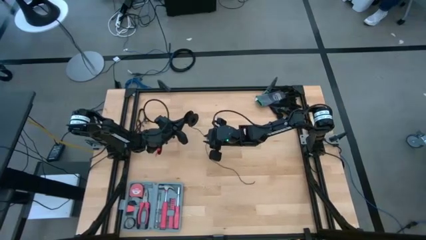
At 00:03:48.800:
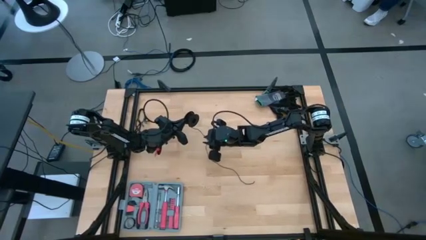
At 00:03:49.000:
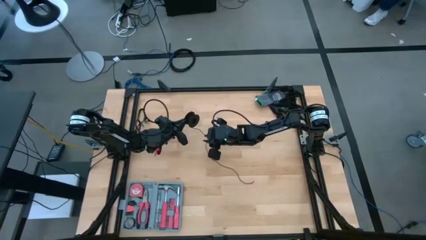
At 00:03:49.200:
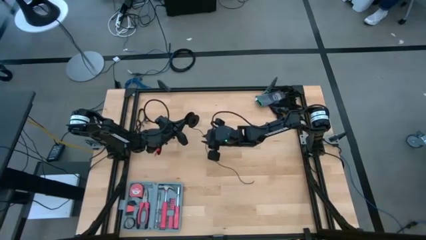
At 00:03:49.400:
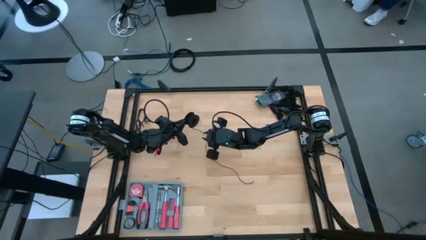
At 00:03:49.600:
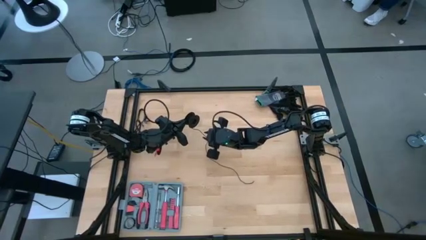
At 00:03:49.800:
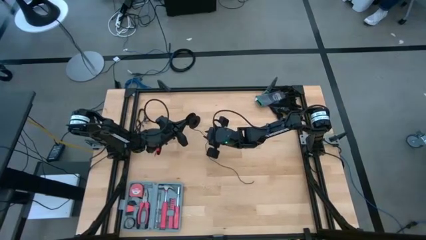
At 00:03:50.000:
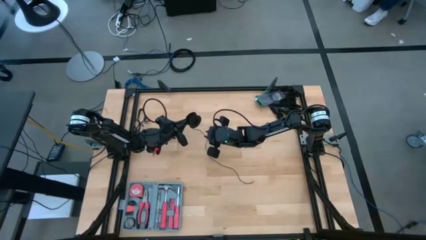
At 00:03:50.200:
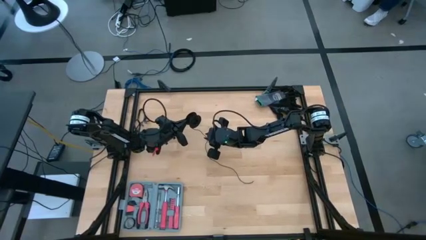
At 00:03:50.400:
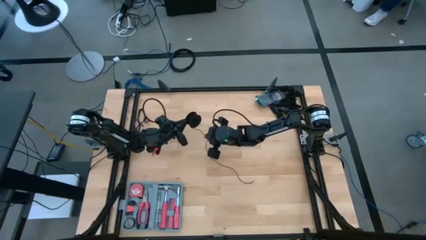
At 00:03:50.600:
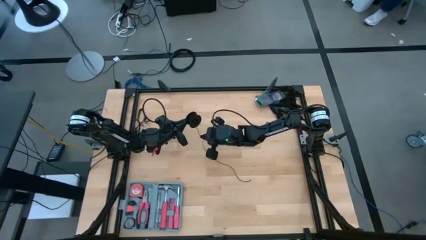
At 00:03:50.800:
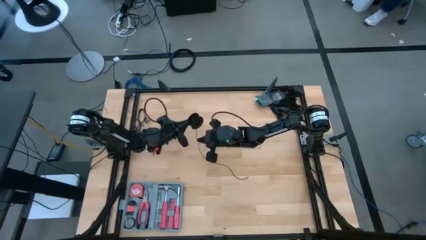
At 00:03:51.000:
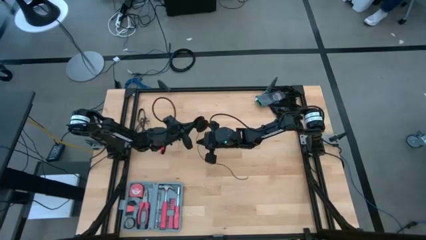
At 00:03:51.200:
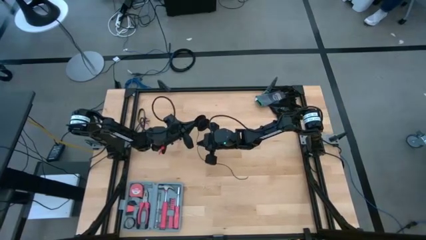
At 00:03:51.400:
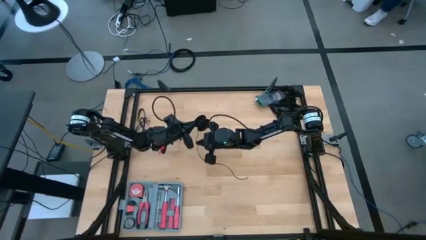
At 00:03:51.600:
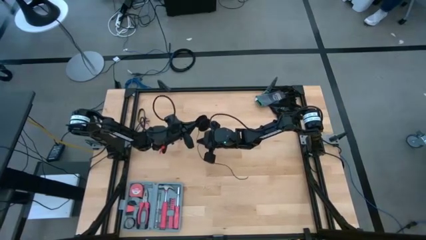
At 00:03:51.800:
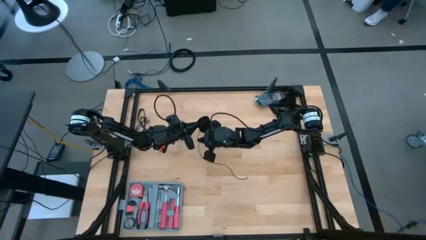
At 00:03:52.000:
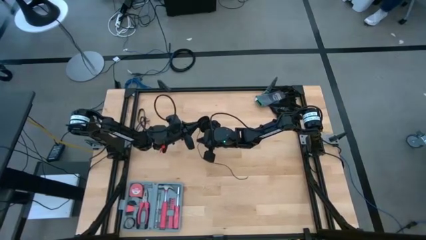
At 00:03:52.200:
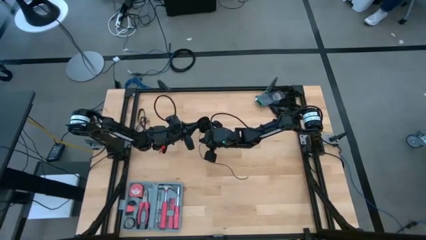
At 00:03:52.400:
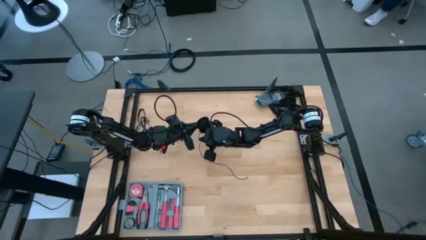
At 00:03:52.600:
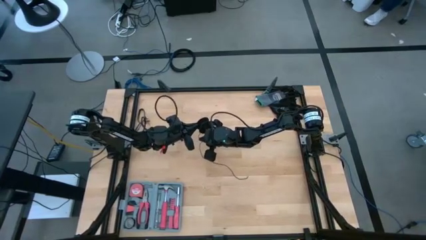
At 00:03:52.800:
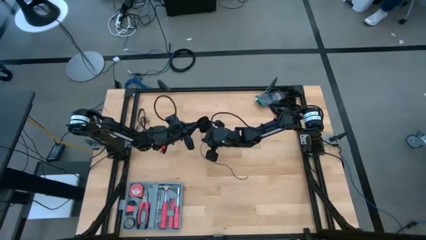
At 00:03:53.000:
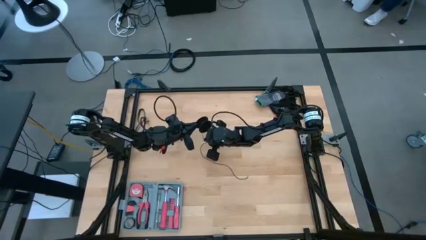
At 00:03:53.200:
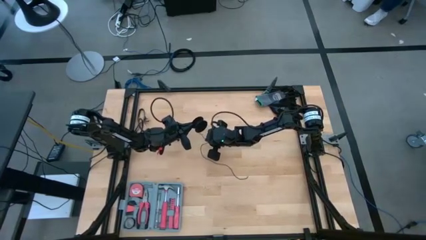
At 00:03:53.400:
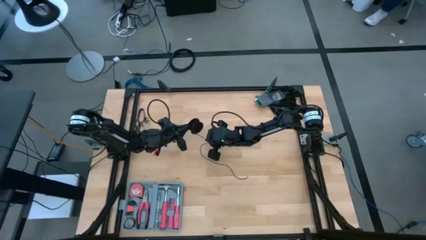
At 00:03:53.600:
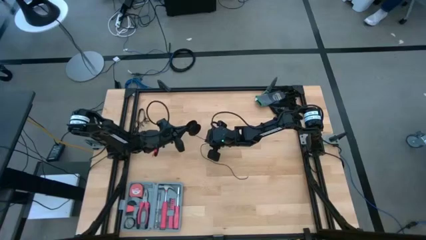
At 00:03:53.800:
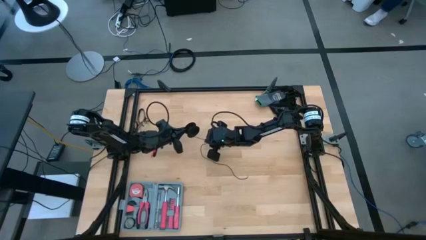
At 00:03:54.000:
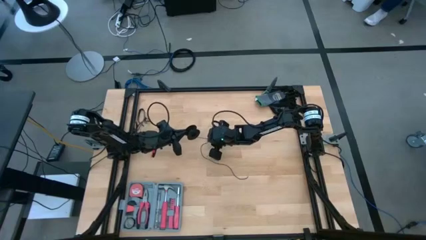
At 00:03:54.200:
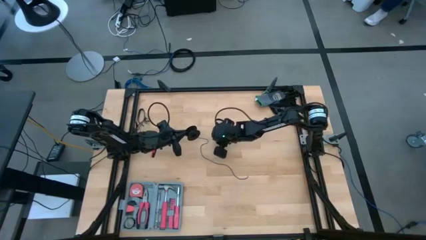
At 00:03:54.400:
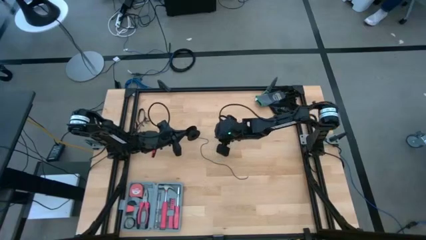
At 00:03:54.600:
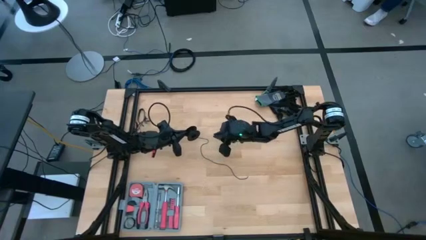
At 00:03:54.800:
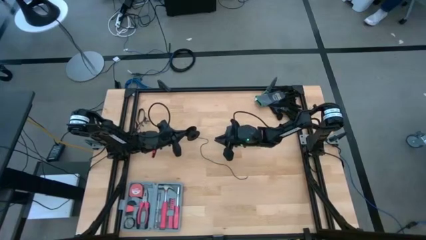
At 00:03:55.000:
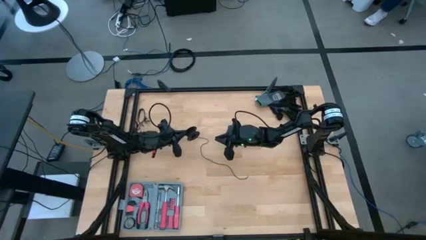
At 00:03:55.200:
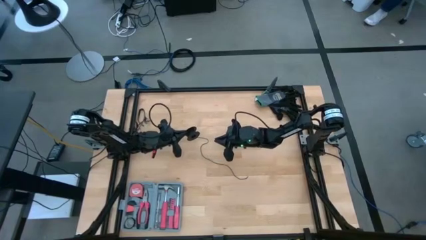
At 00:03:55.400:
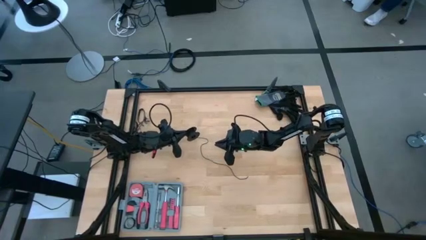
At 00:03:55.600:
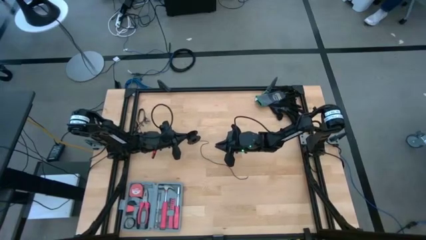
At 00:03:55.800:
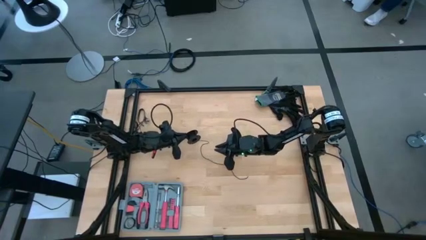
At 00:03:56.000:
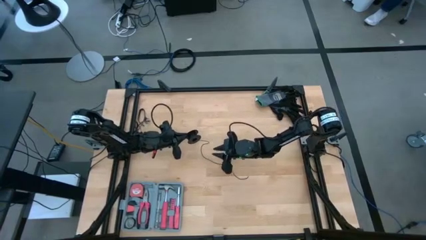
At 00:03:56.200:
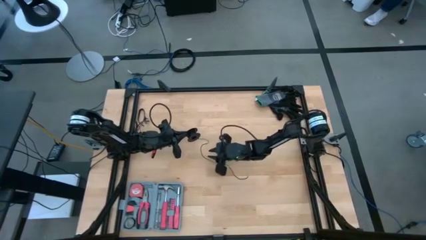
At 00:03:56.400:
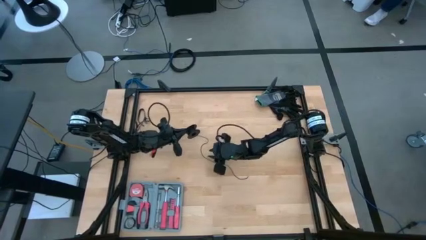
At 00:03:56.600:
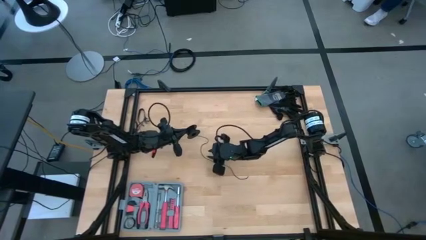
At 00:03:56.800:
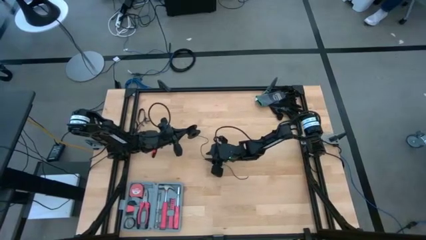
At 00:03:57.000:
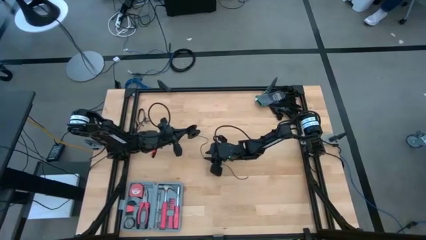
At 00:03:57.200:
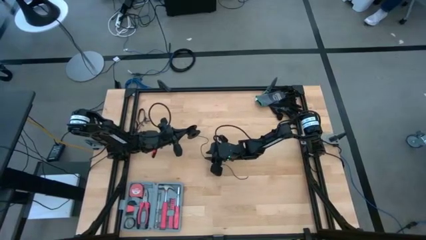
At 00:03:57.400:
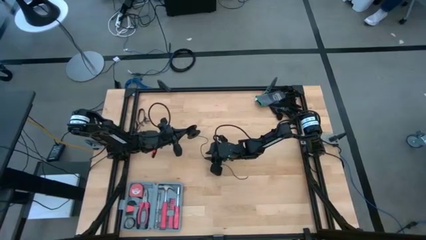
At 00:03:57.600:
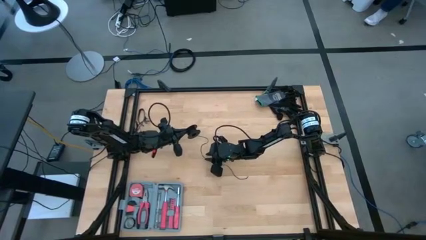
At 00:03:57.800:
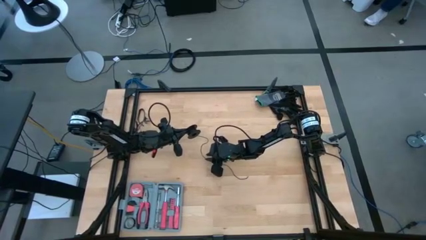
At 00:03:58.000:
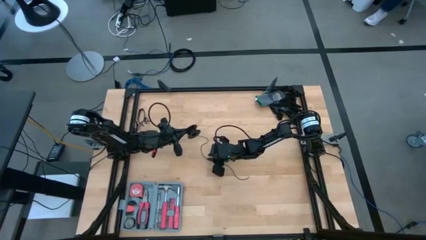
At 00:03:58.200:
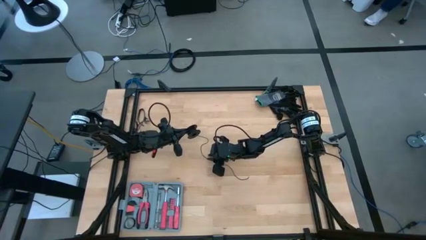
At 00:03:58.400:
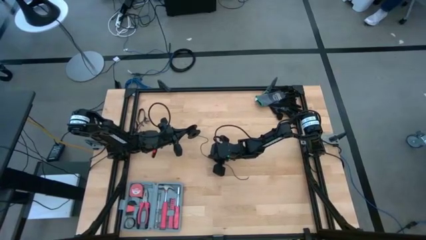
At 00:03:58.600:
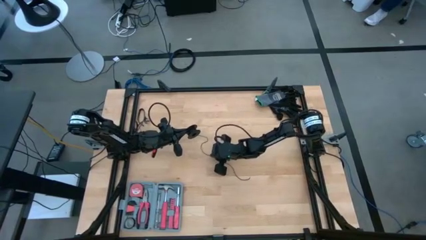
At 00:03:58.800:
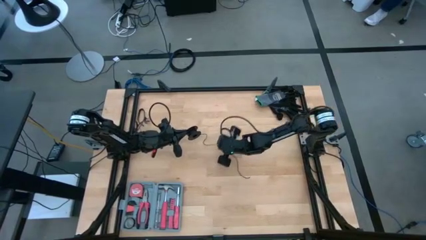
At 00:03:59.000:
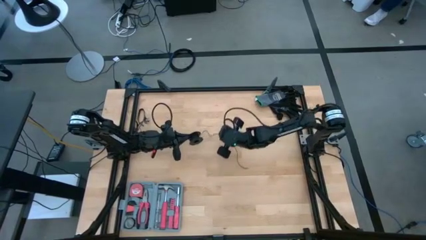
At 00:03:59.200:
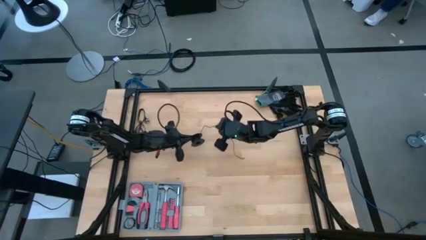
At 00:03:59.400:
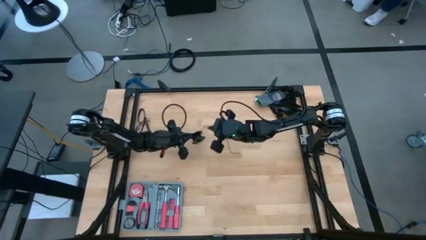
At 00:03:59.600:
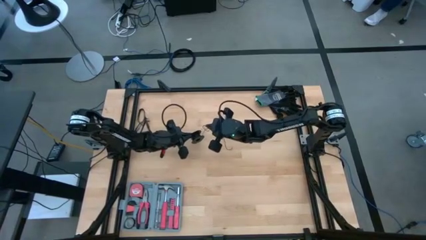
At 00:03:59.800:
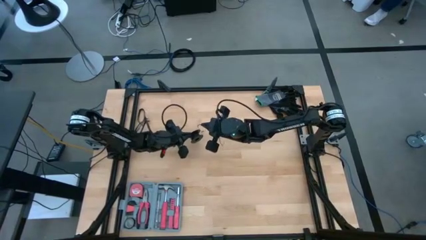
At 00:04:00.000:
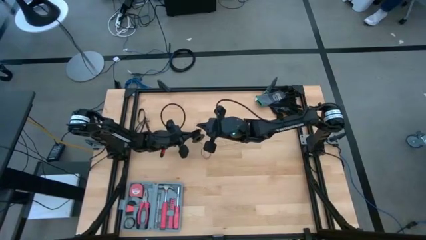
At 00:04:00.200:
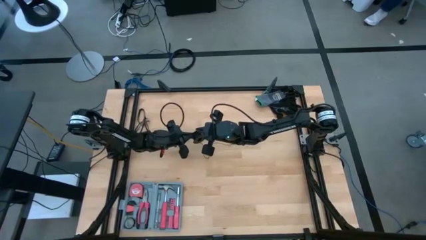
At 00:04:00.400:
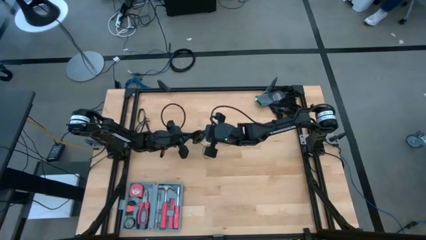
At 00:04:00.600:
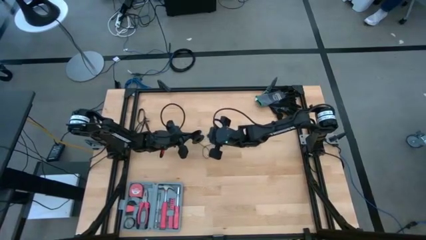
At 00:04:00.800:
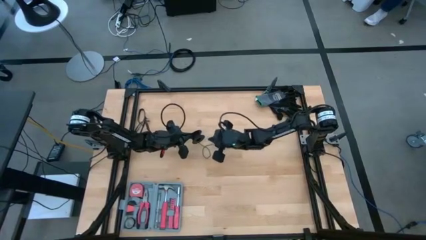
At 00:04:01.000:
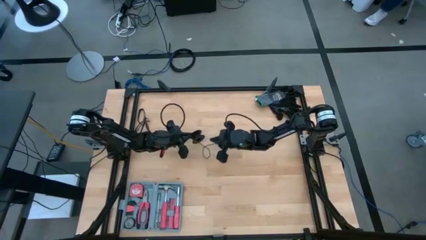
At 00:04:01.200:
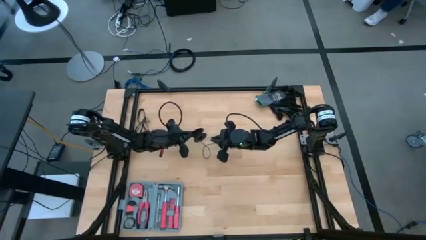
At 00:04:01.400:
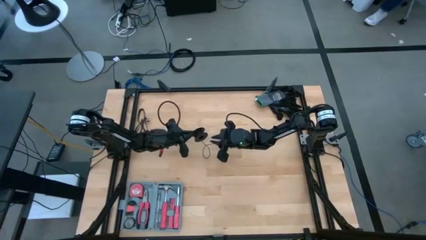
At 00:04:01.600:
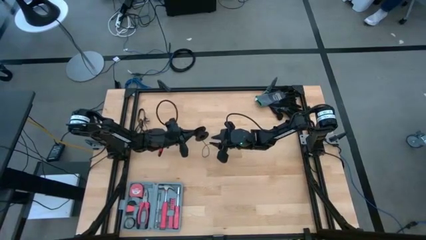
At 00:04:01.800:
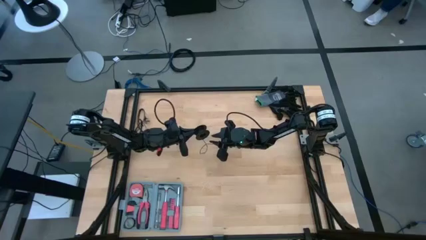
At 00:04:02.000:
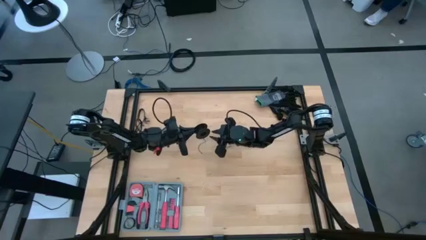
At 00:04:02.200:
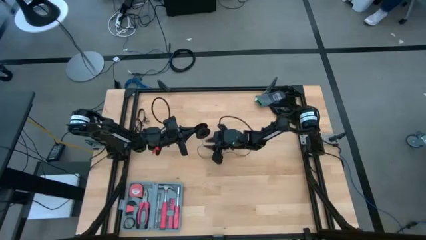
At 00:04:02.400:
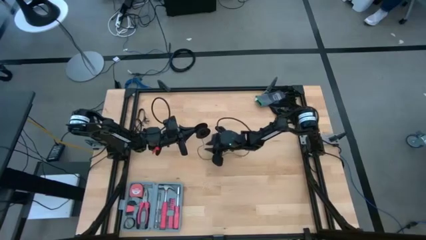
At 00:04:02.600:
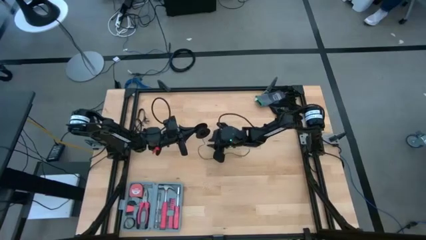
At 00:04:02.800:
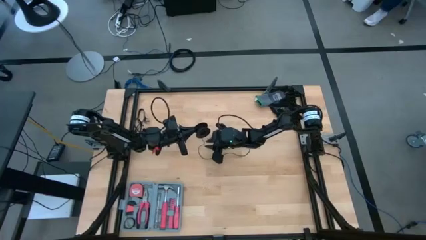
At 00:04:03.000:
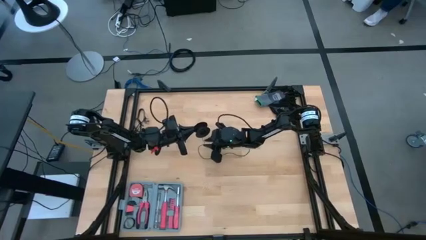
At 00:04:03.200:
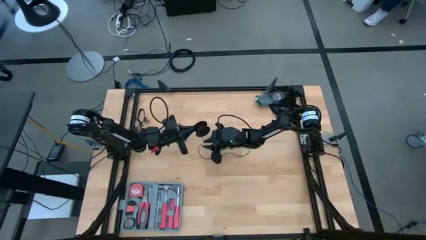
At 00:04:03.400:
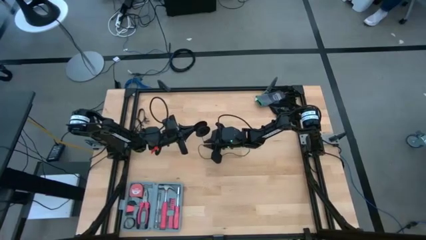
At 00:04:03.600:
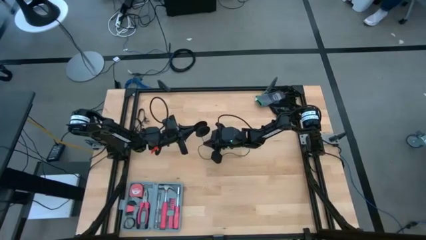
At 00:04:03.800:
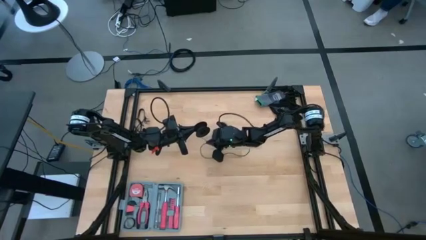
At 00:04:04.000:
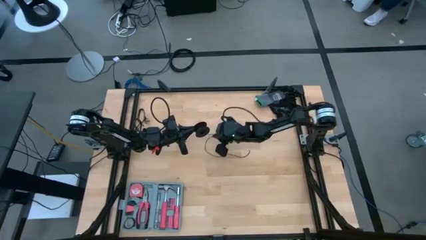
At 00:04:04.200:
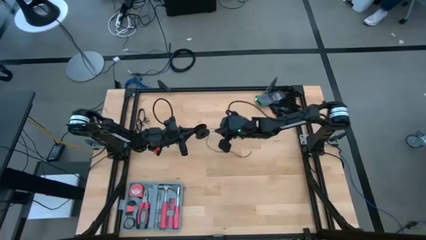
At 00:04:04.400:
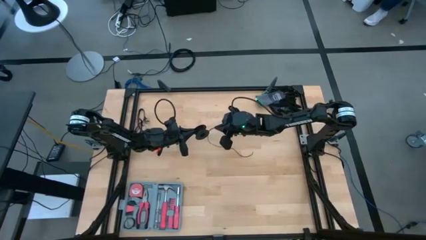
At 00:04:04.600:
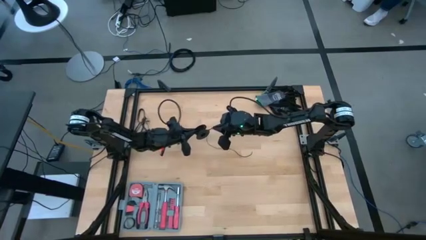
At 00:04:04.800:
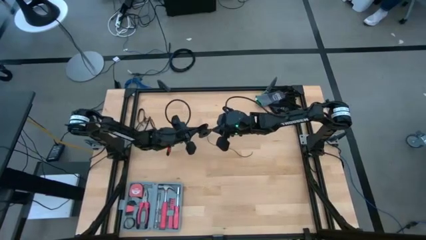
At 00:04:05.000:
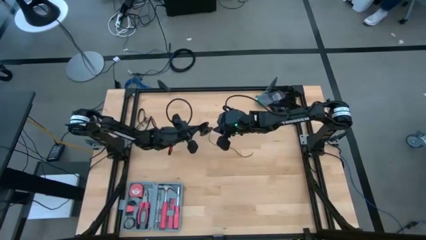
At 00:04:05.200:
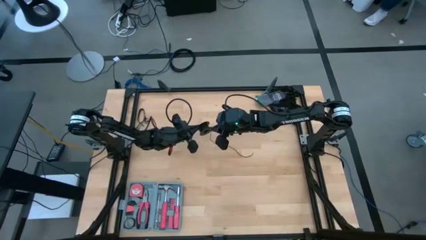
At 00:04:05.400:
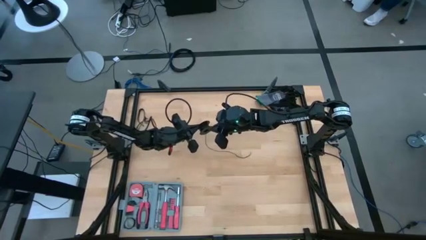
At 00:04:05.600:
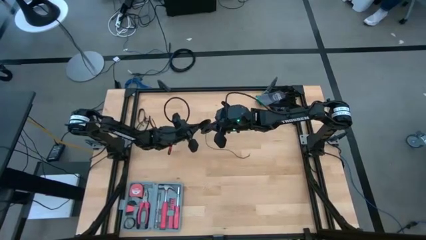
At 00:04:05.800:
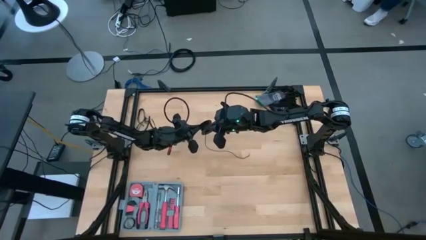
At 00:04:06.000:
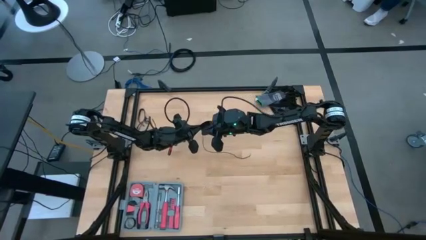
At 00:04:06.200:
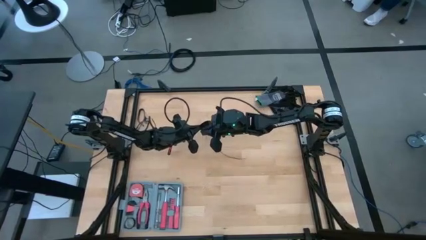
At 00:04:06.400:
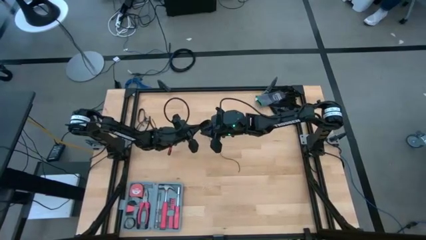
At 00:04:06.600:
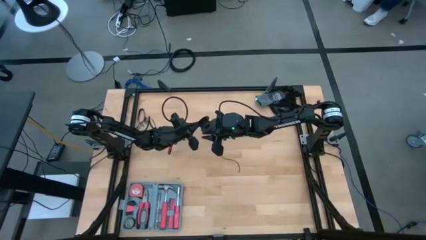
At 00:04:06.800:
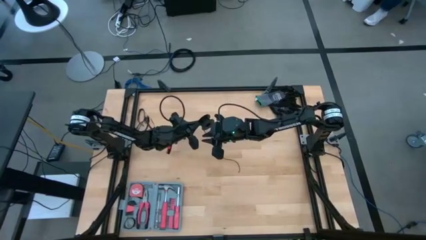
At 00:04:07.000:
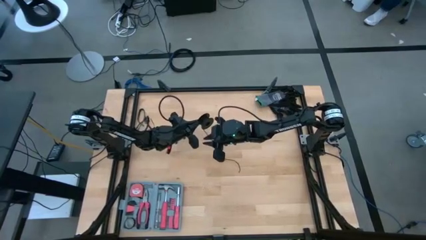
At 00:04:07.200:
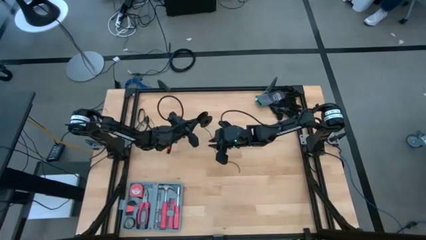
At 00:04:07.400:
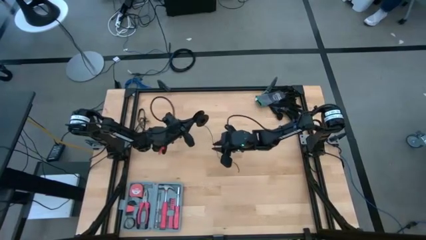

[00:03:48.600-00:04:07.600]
Task: Coil cords
Coil the black wire on the spool
